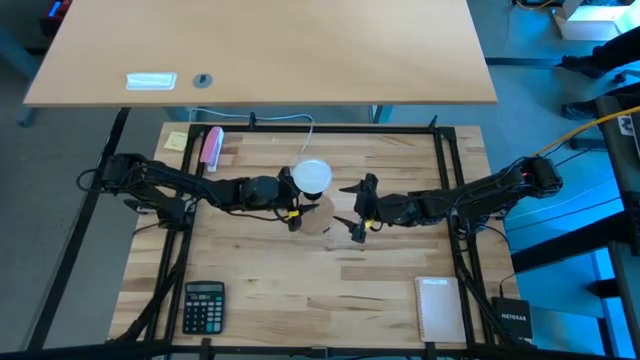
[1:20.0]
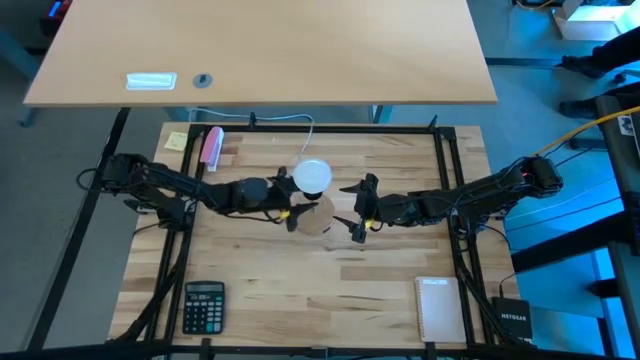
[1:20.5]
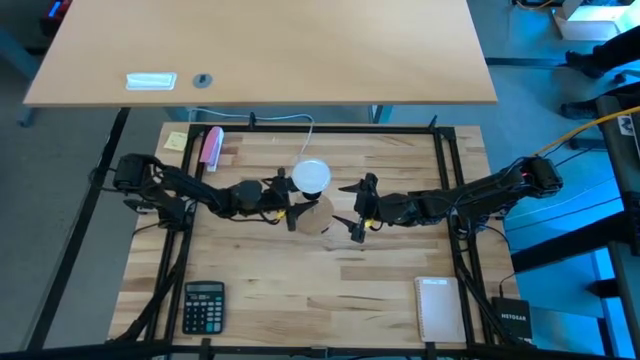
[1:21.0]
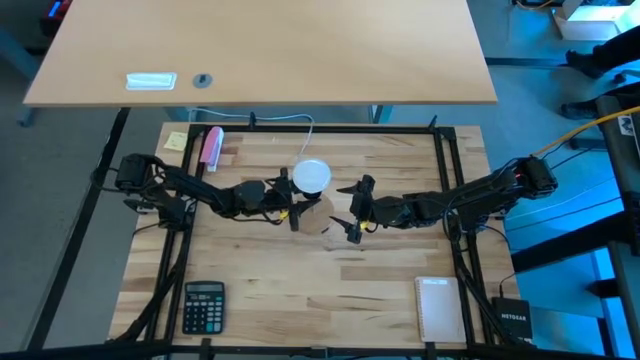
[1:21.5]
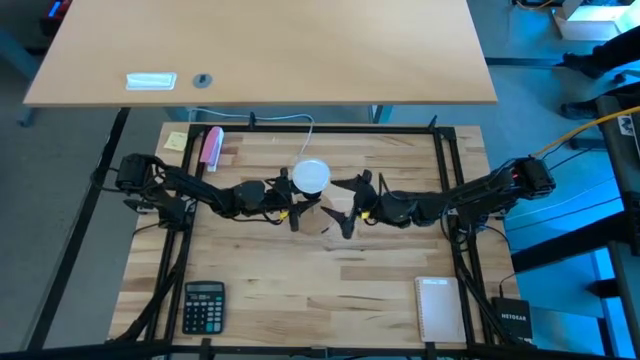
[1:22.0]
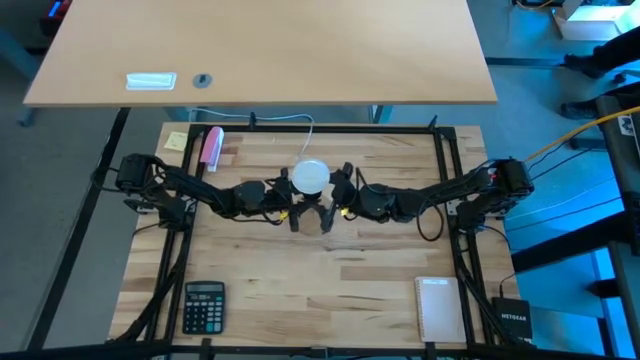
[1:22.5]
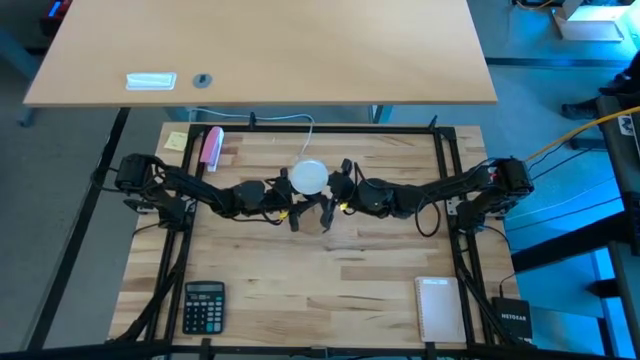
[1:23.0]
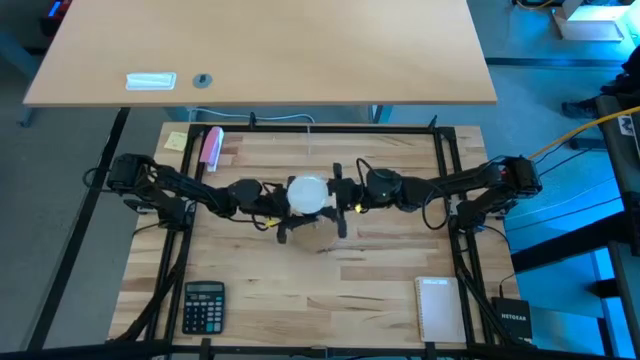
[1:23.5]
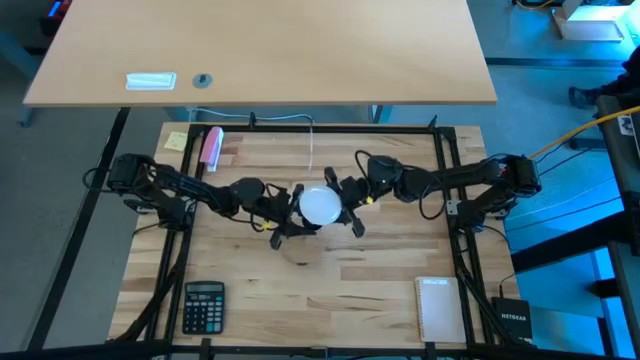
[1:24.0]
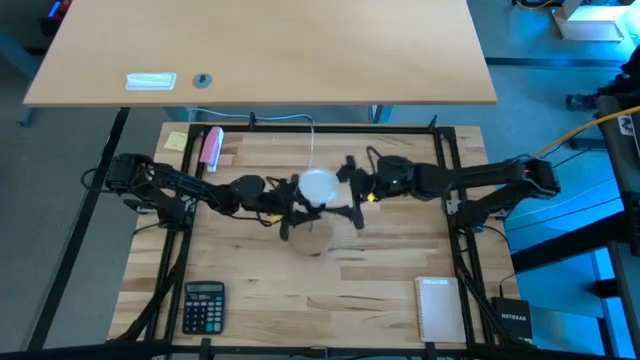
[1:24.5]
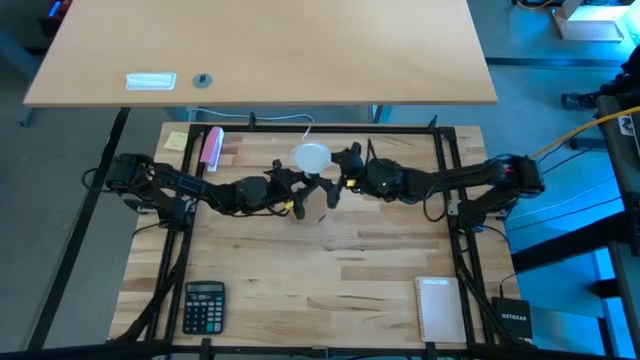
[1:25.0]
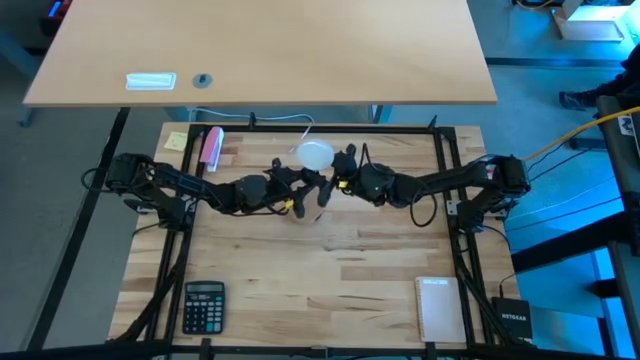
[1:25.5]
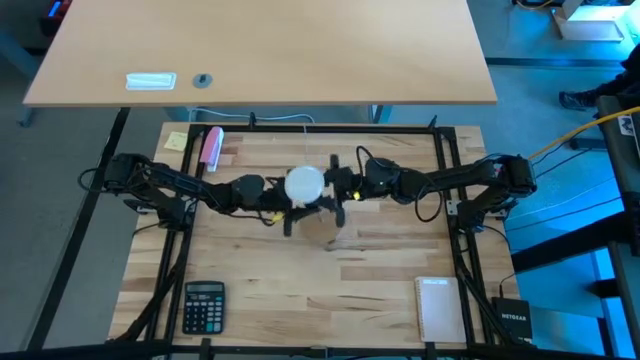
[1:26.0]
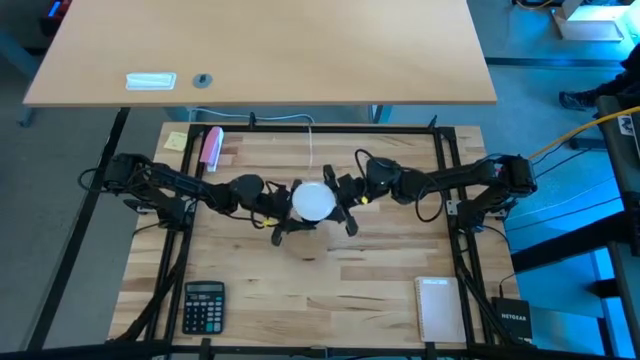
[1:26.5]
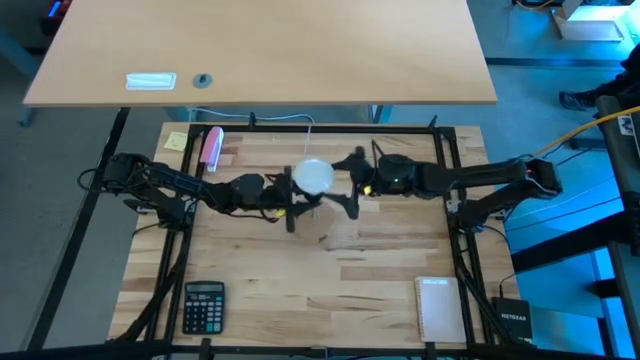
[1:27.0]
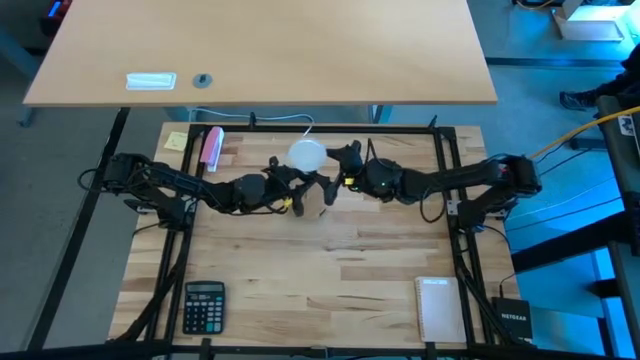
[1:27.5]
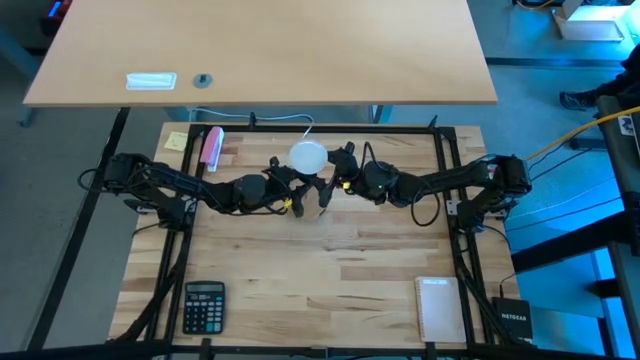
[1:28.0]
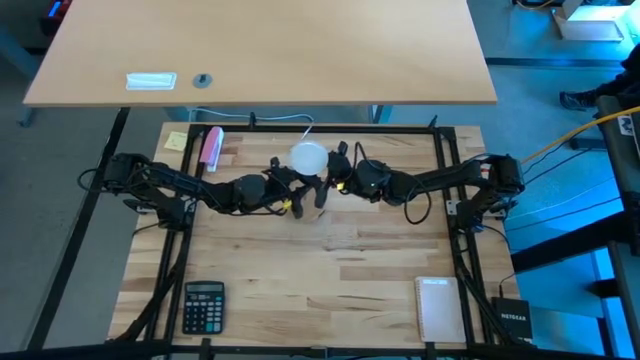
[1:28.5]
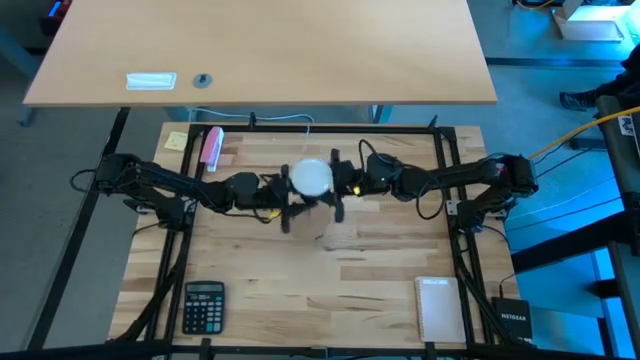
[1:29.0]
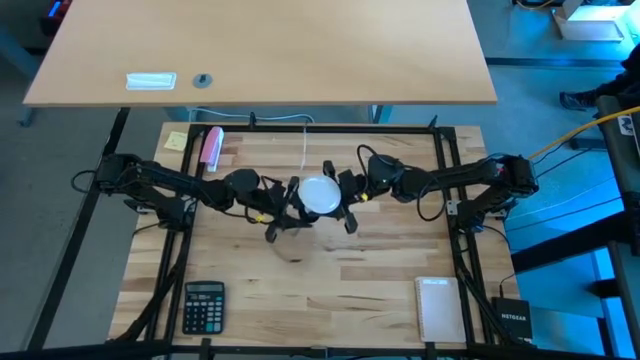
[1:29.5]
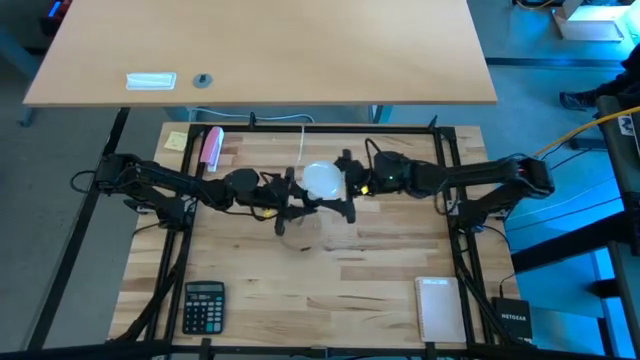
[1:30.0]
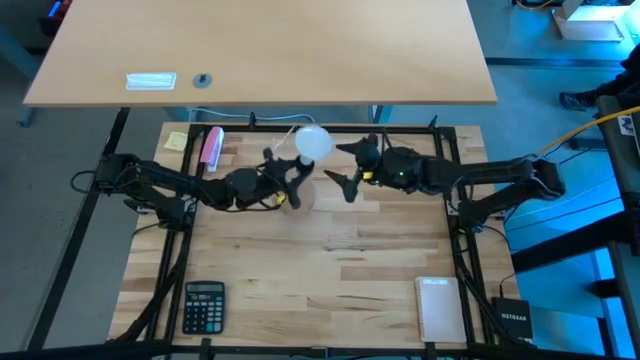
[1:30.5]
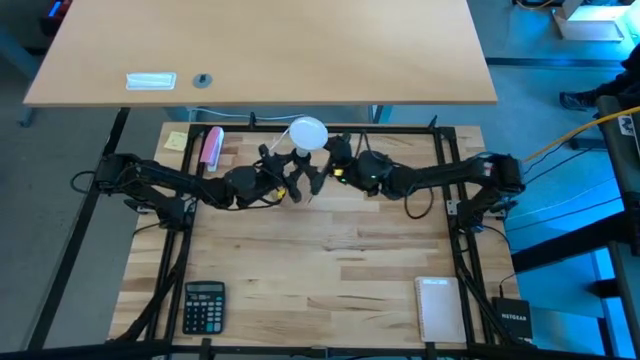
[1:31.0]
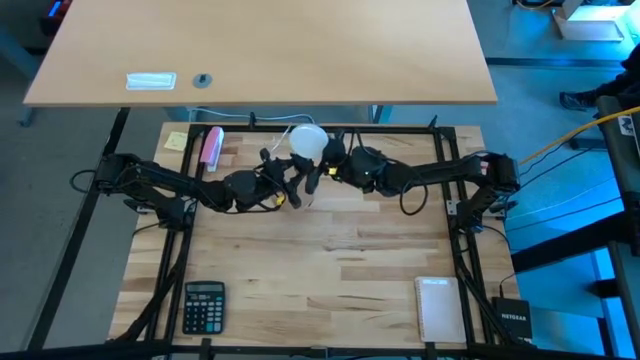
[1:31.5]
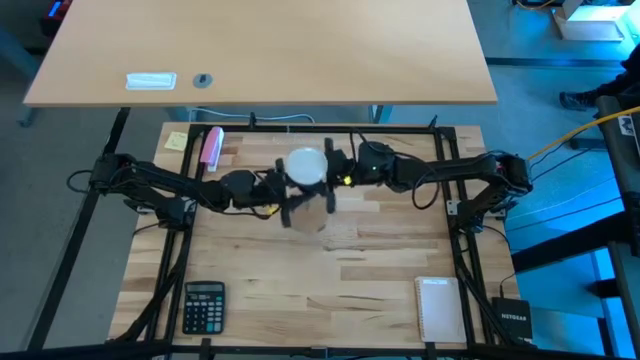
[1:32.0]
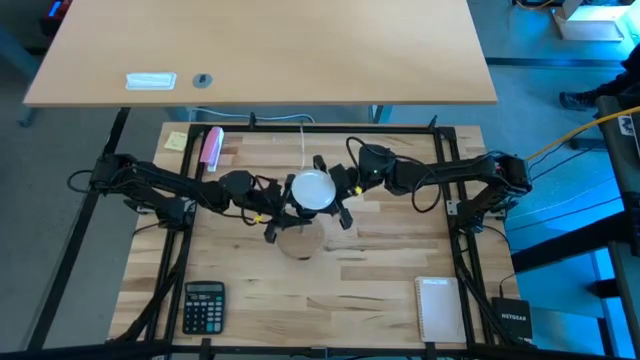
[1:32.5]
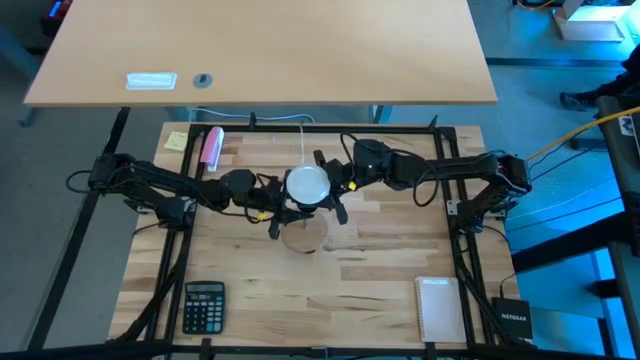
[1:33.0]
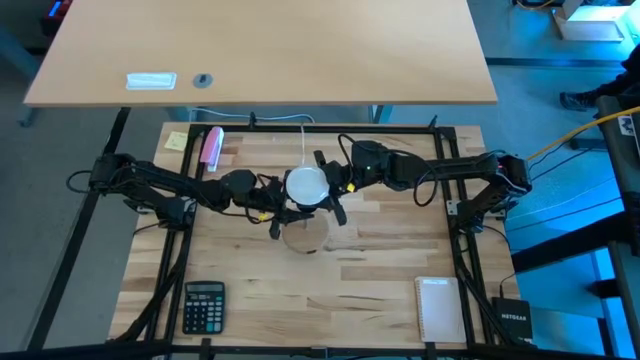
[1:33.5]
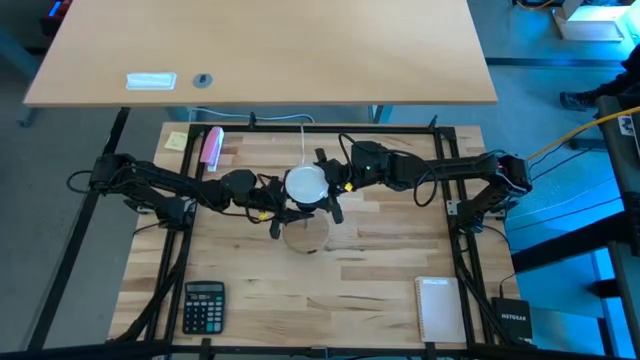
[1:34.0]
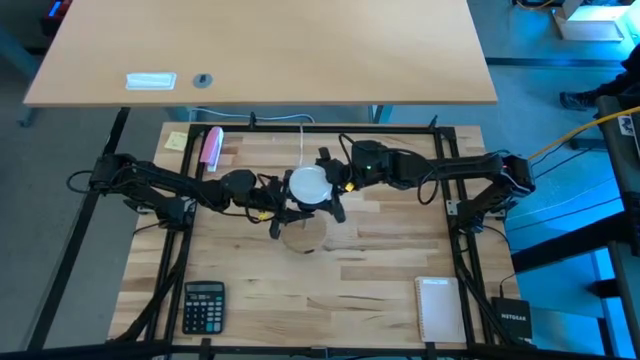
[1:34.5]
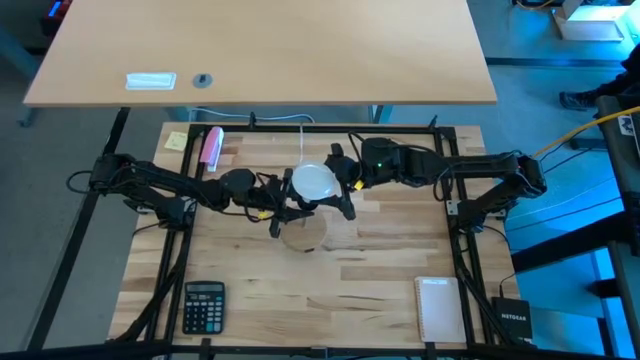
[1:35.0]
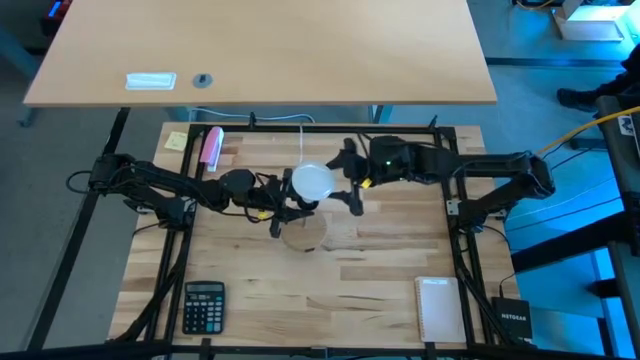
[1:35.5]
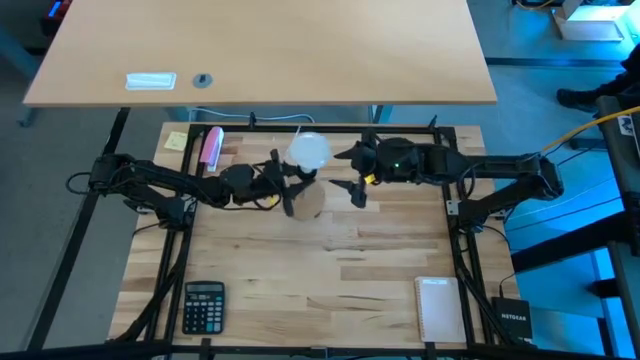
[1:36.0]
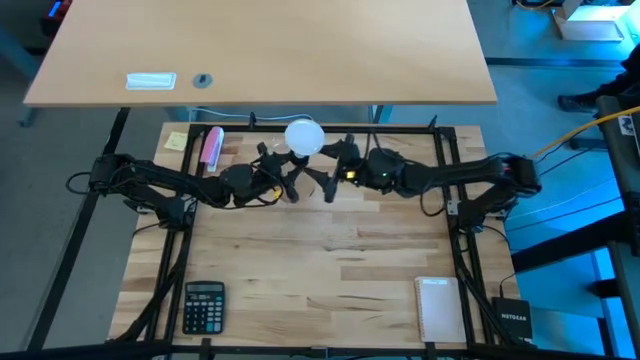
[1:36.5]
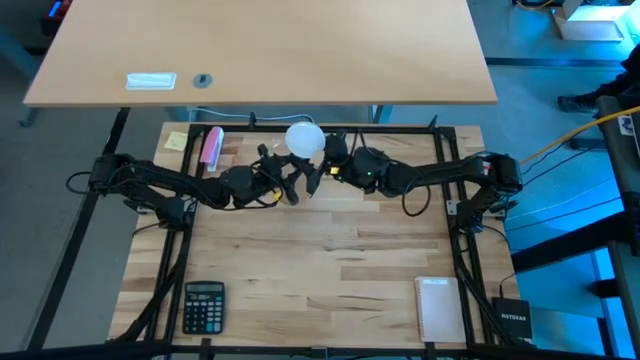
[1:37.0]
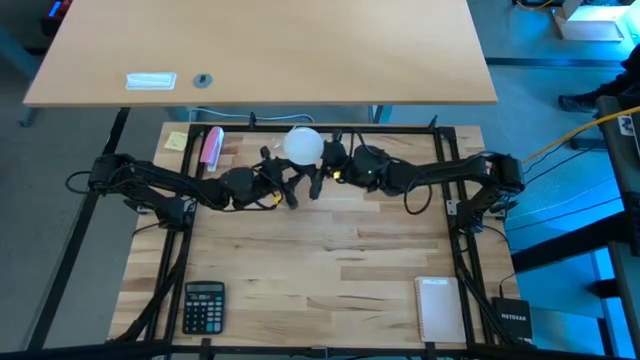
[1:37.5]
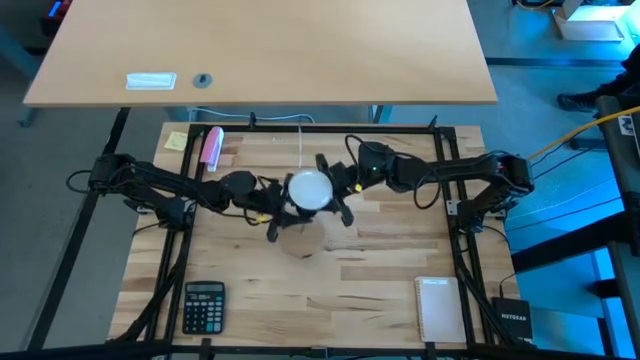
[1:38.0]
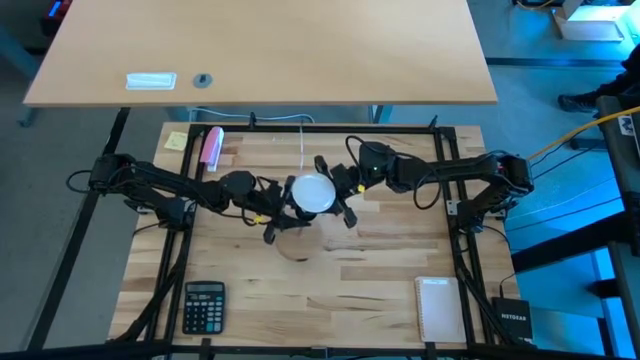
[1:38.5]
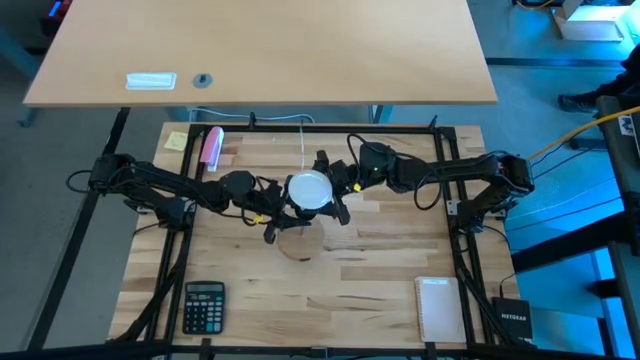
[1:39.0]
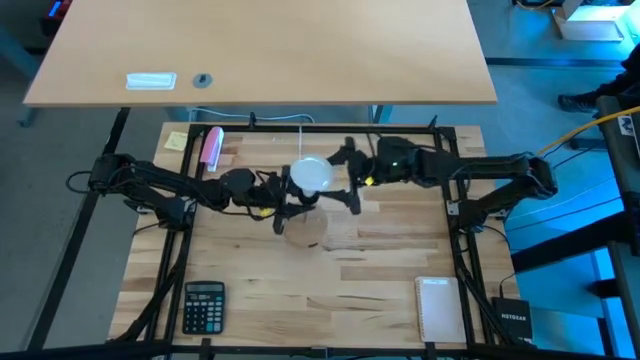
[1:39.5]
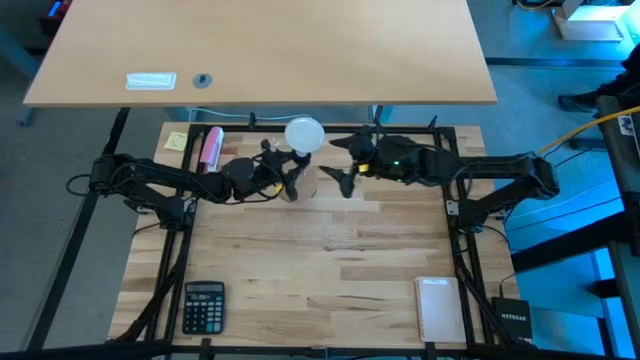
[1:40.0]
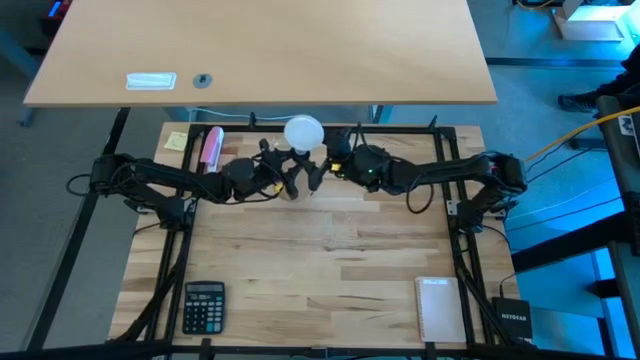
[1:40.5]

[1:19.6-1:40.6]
Task: Screw lightbulb
Remove the white lightbulb from the brown lamp
